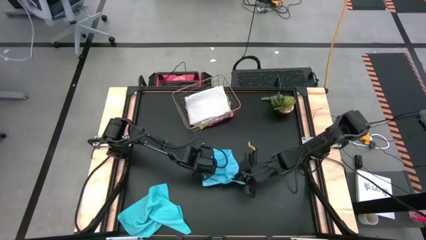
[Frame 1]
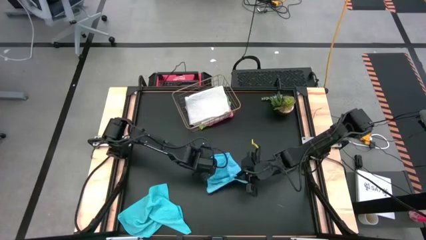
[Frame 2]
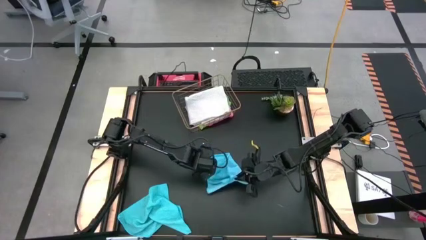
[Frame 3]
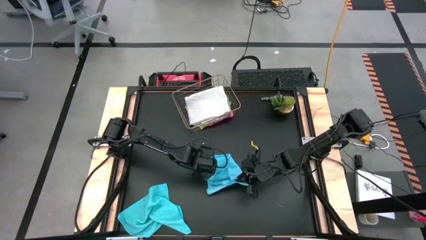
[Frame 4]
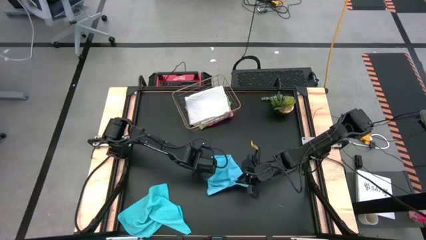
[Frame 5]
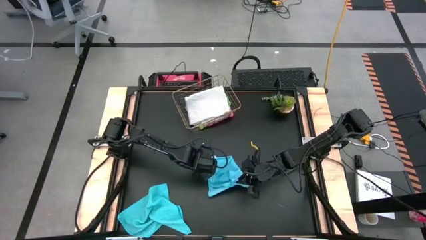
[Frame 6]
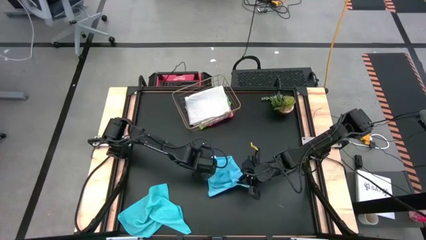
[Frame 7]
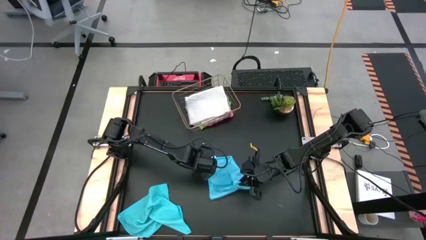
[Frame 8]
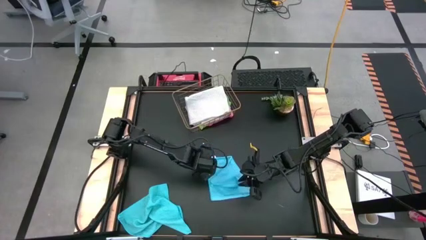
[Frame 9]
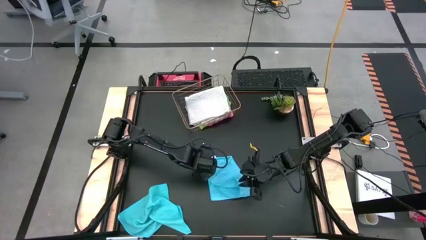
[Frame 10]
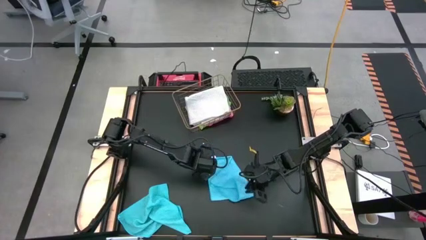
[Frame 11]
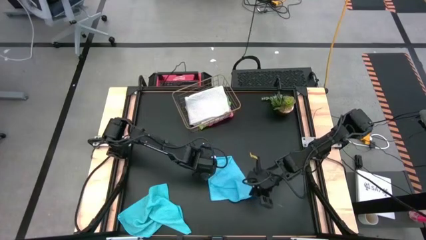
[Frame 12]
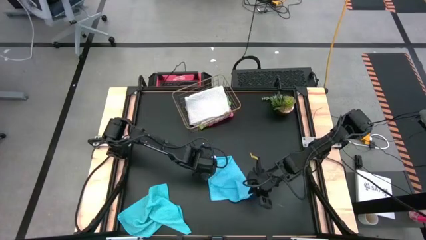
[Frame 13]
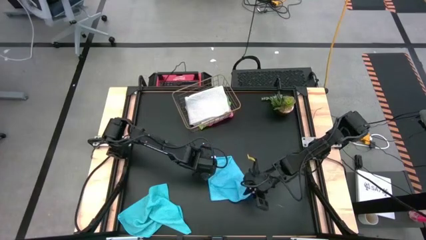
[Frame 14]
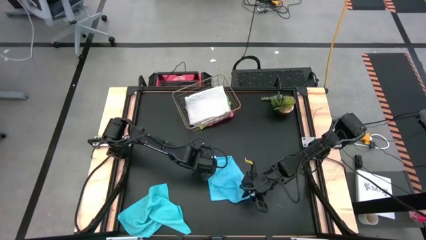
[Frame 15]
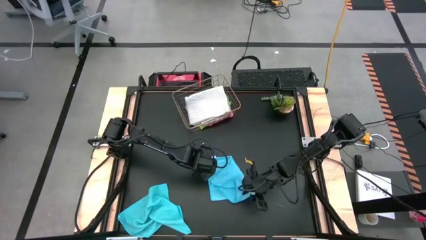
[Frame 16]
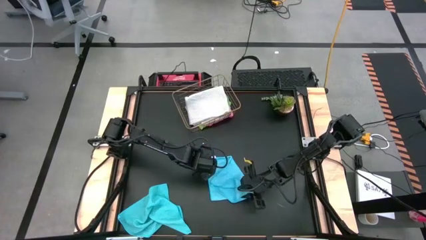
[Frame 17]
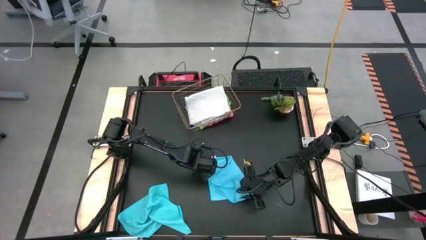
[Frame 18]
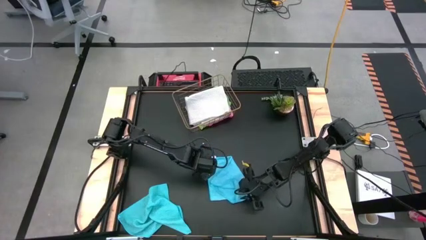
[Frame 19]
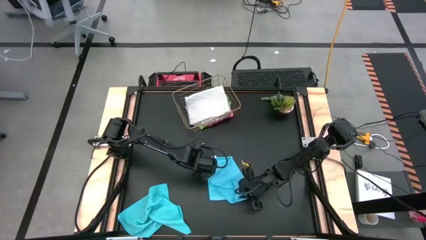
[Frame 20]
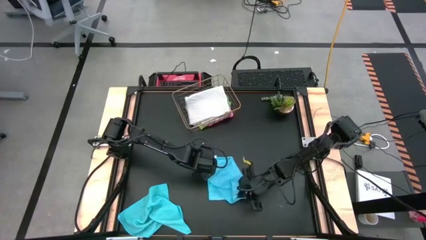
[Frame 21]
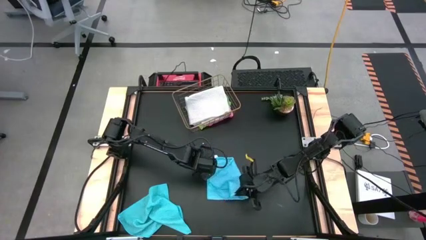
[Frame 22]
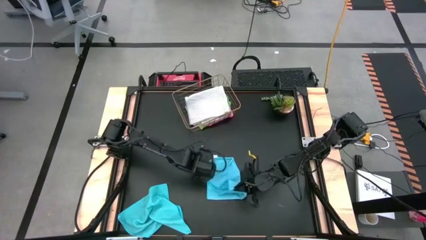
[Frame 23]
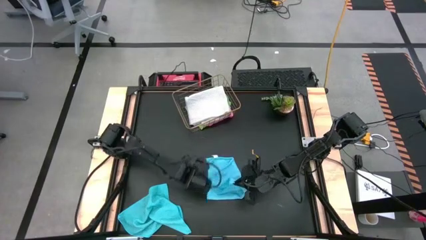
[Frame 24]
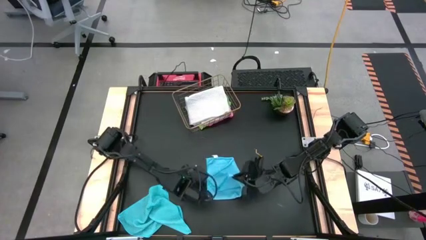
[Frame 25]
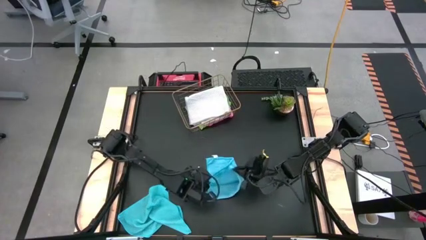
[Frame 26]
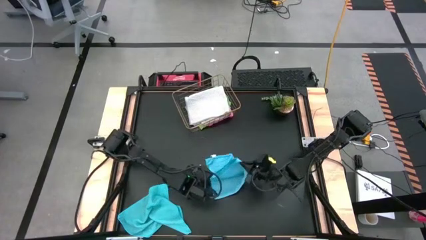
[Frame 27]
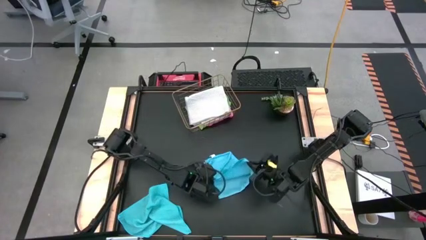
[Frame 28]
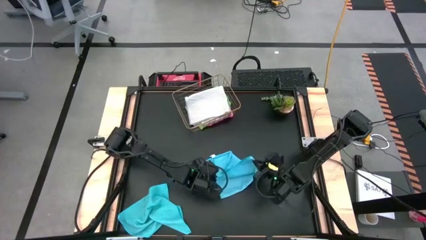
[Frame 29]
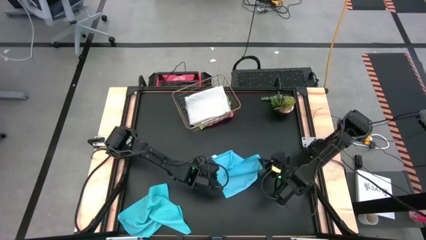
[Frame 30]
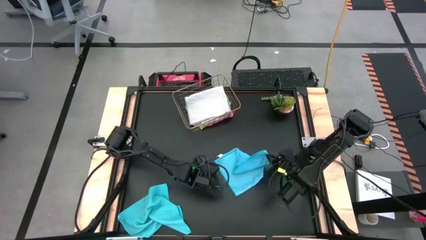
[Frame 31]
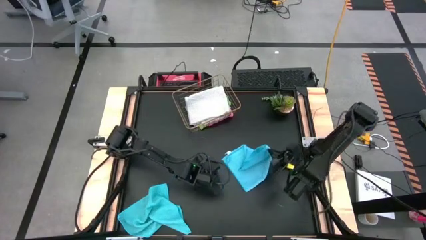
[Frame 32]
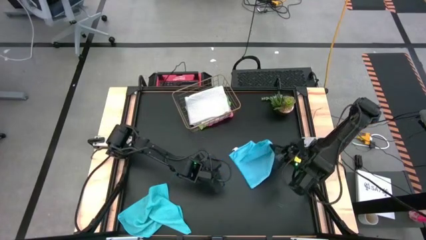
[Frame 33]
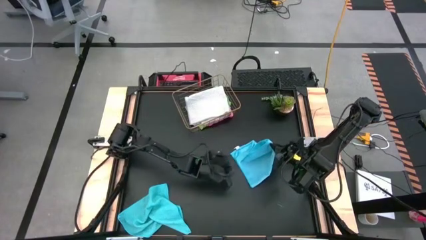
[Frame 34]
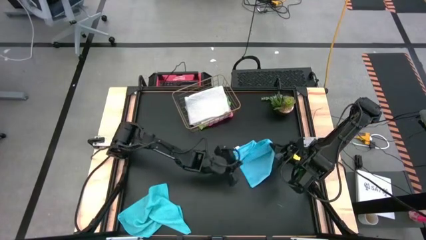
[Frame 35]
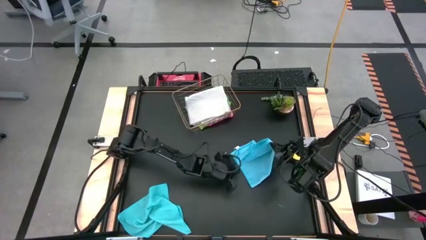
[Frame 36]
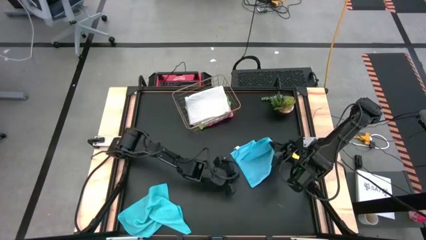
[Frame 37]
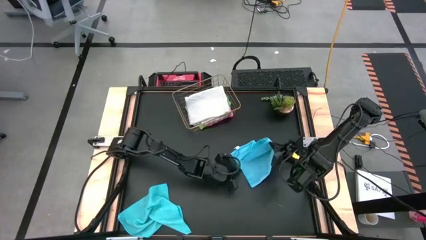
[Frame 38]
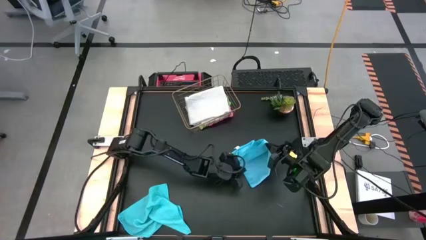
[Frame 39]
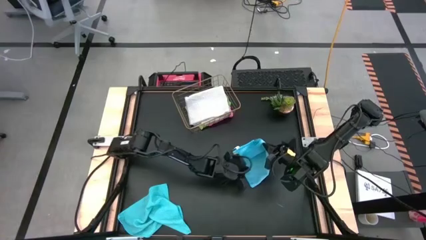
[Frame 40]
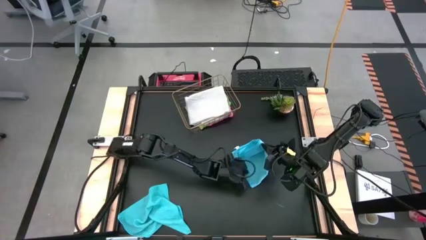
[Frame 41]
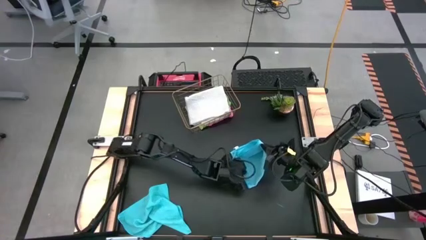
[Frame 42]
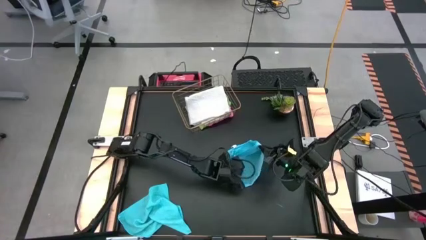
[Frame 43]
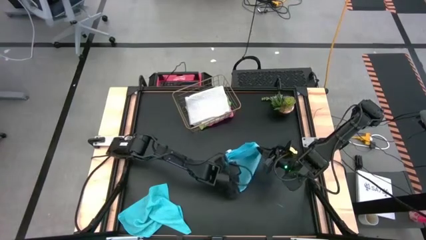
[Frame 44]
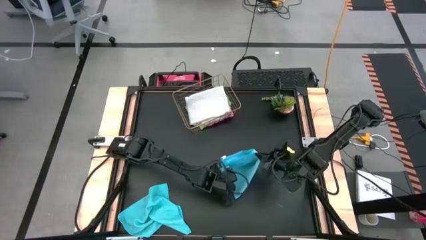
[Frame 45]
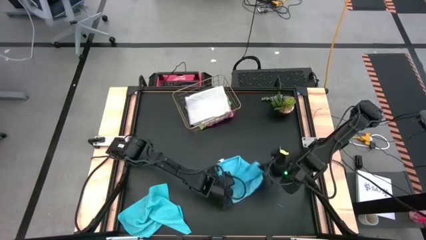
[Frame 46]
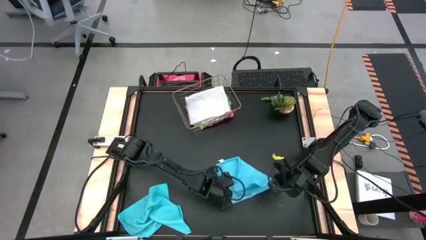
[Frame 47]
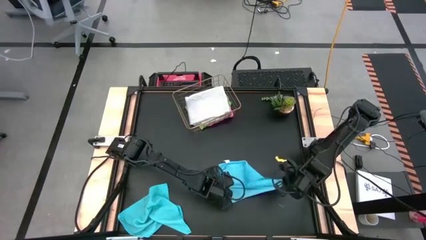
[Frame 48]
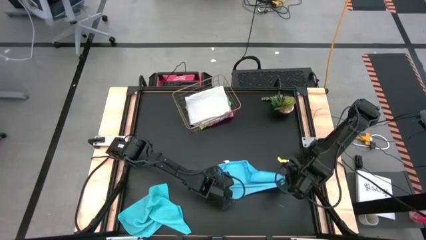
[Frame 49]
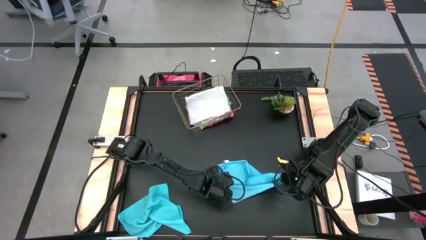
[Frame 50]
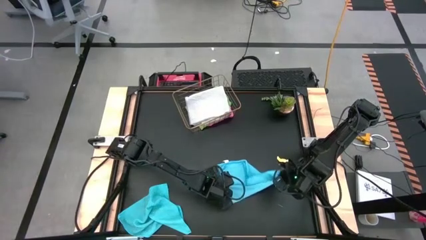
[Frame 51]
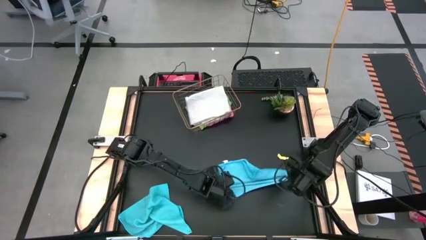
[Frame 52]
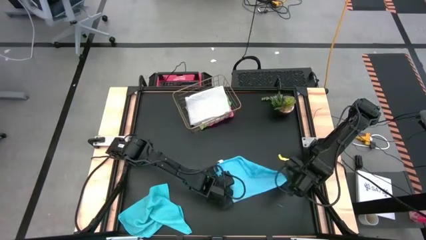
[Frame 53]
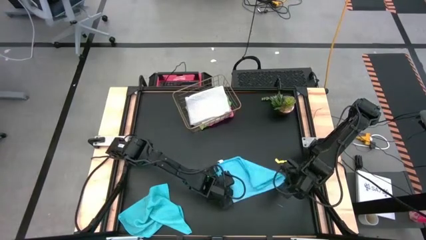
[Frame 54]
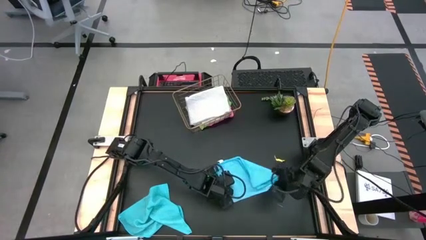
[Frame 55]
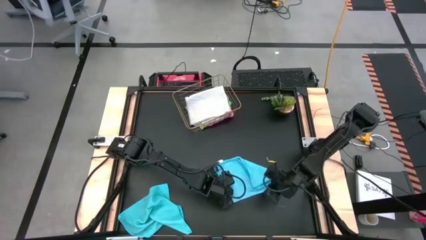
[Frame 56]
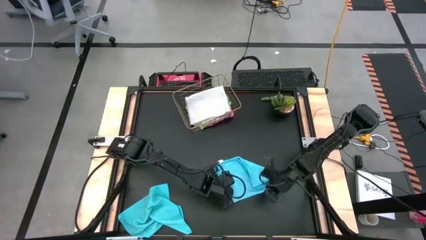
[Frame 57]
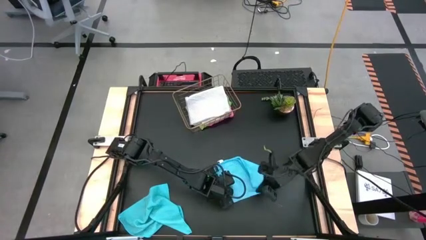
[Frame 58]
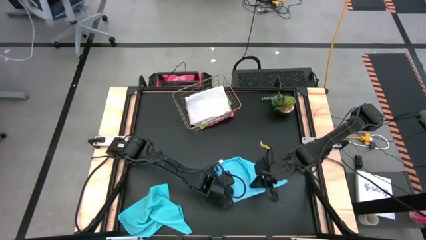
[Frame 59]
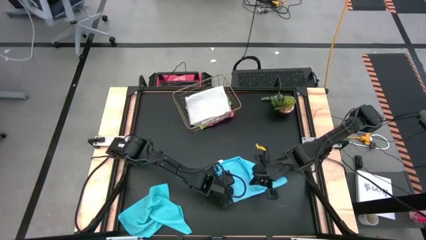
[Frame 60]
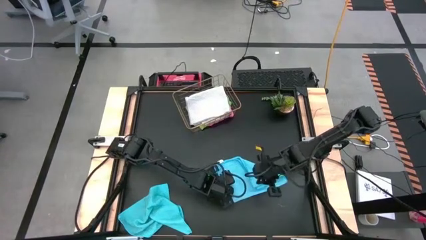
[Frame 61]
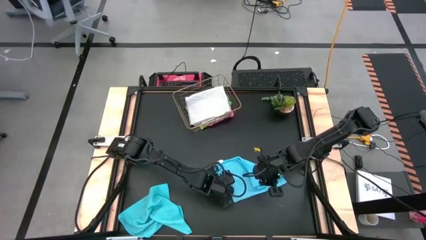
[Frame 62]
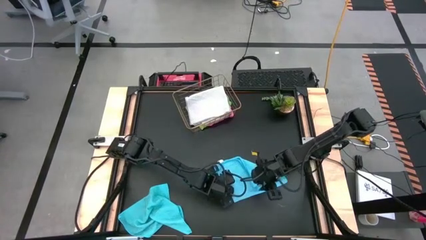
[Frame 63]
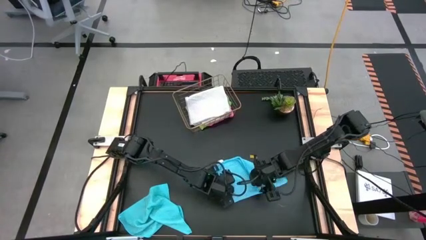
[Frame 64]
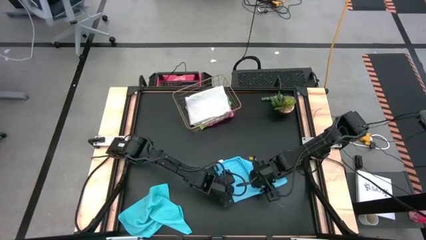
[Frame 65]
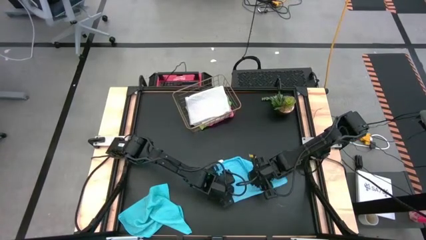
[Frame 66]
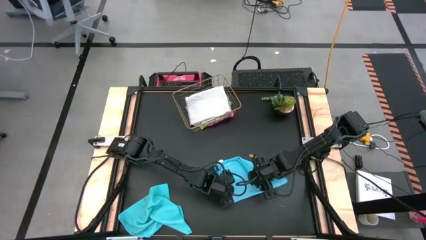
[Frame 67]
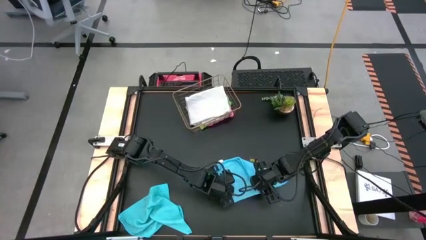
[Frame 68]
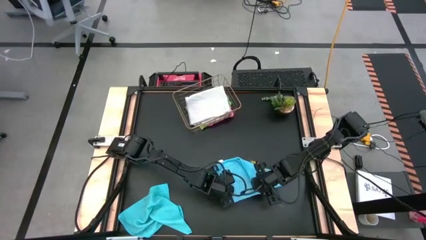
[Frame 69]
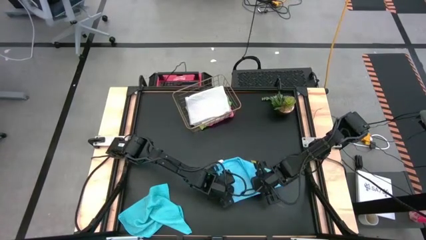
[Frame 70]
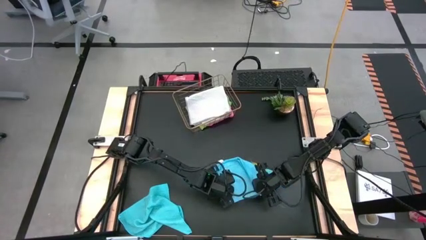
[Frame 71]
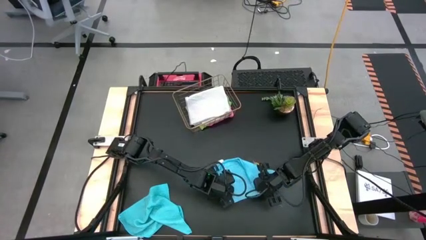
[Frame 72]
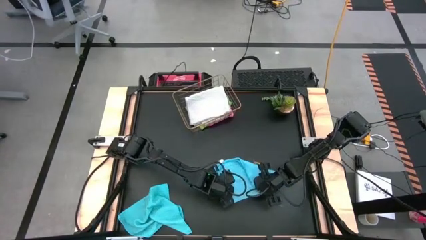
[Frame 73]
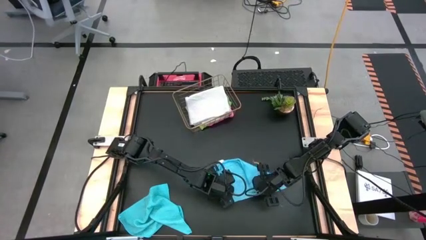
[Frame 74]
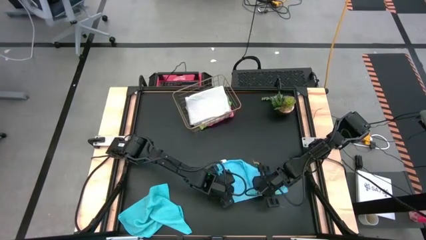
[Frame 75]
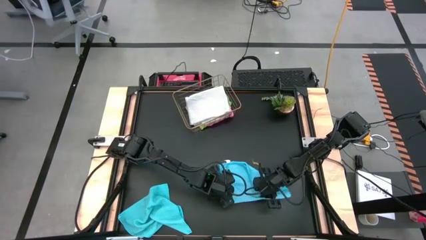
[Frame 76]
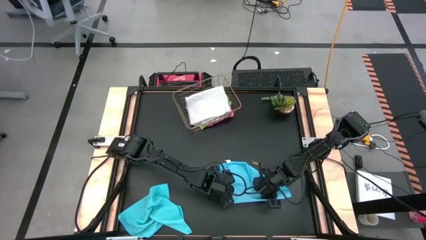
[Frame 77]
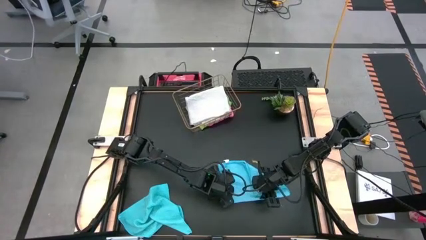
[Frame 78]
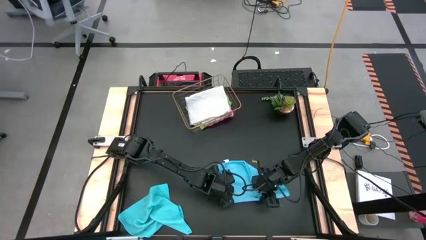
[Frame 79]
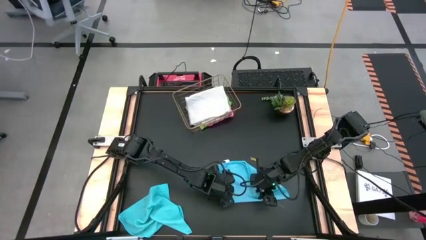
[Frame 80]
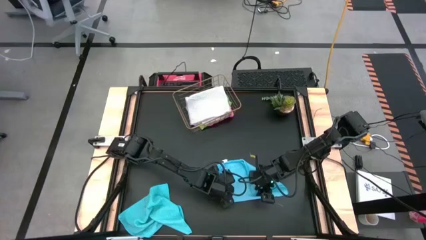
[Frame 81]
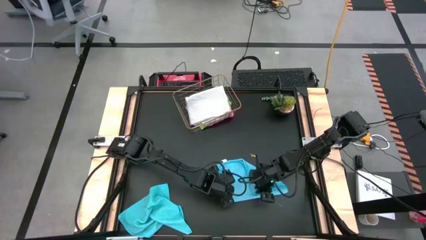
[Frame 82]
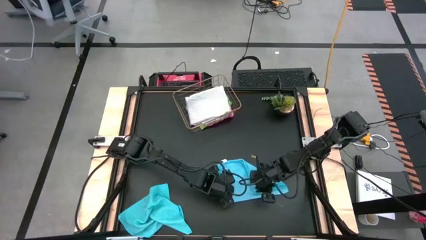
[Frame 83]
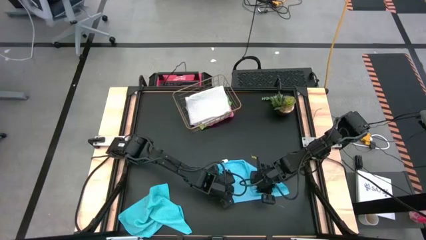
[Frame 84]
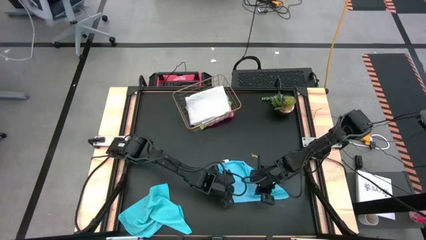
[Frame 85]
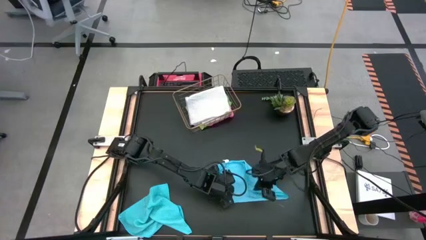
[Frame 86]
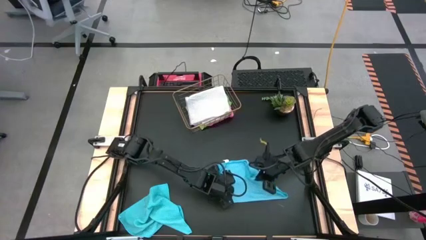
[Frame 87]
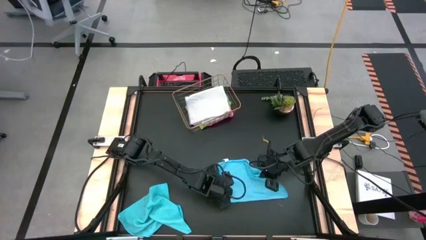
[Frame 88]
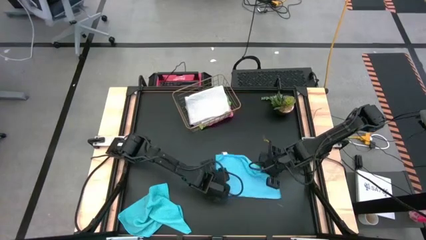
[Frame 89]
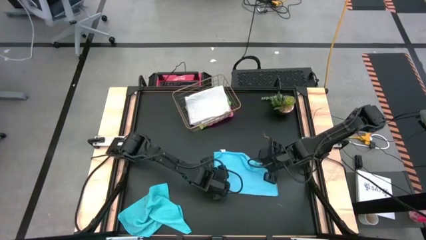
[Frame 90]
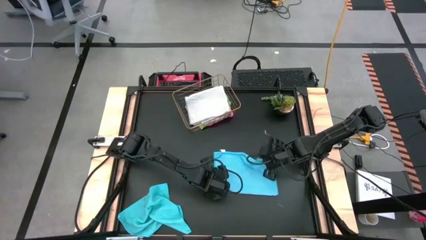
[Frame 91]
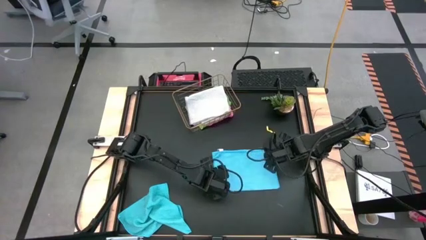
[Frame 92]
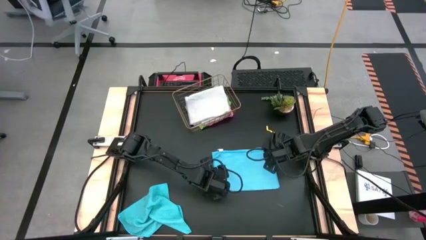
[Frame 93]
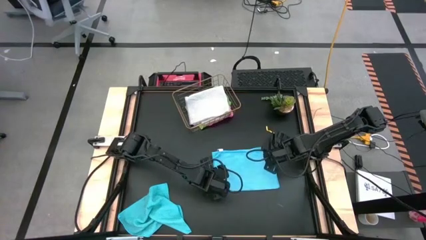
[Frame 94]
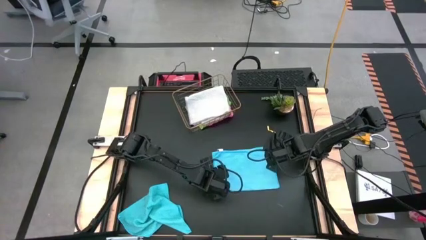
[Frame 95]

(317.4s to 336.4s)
Task: Fold microfiber towels
Fold the right light blue microfiber cloth
